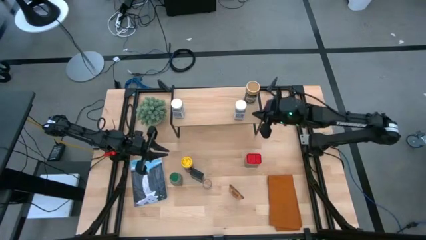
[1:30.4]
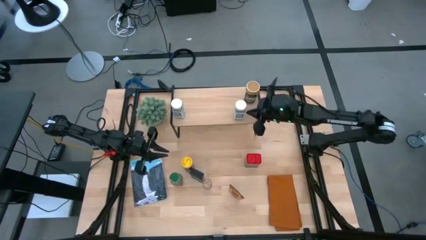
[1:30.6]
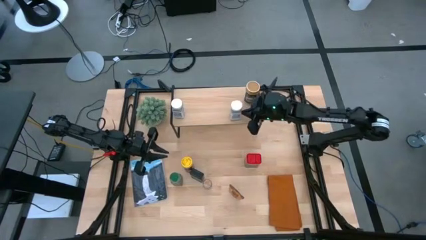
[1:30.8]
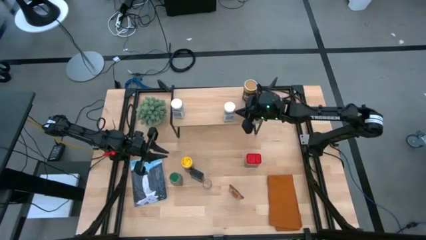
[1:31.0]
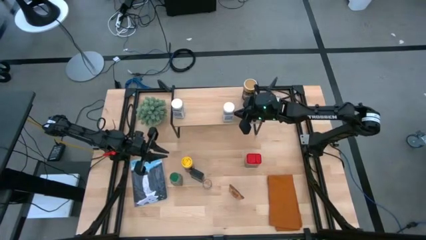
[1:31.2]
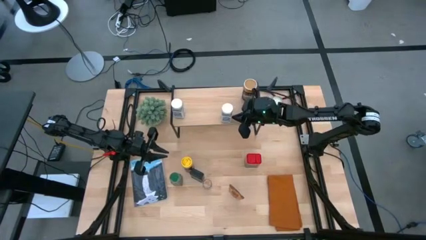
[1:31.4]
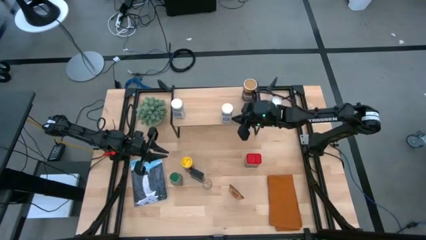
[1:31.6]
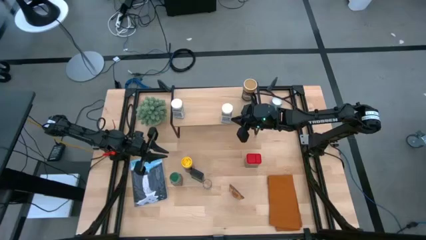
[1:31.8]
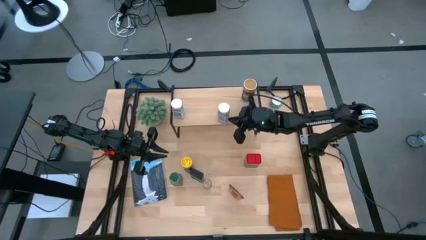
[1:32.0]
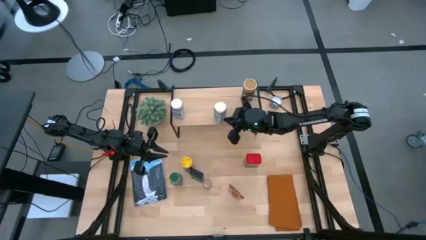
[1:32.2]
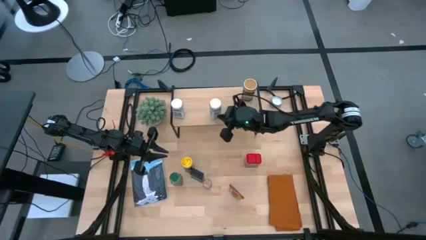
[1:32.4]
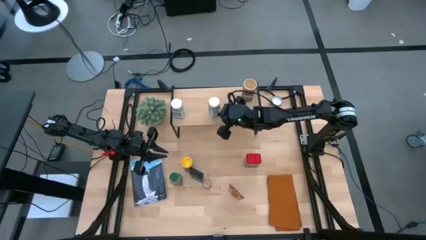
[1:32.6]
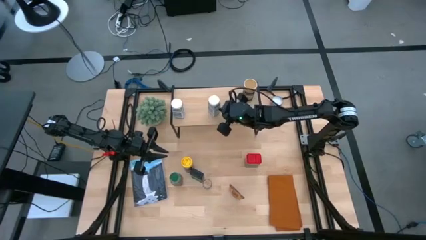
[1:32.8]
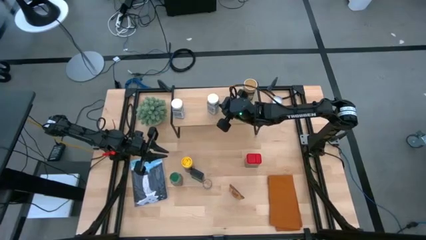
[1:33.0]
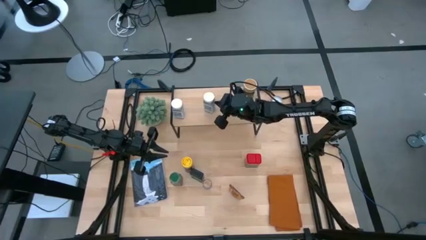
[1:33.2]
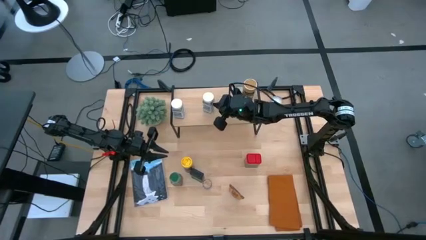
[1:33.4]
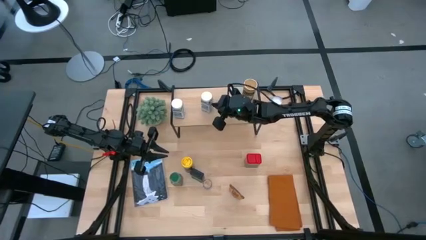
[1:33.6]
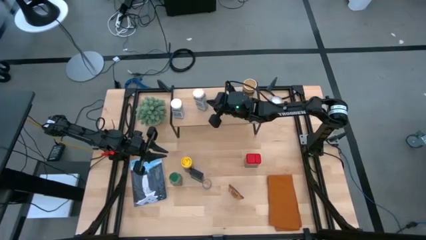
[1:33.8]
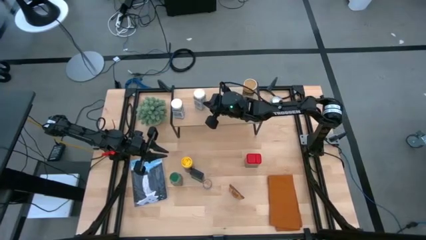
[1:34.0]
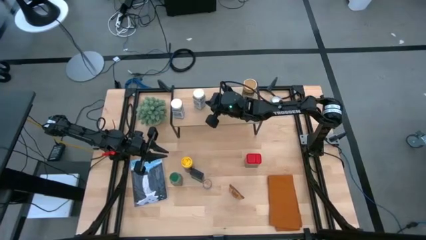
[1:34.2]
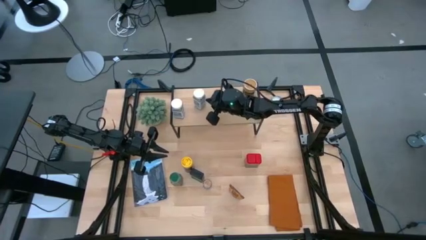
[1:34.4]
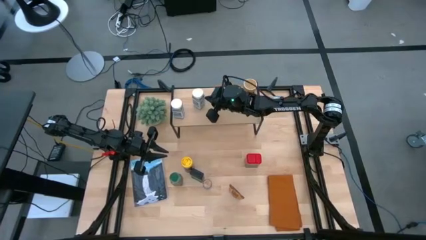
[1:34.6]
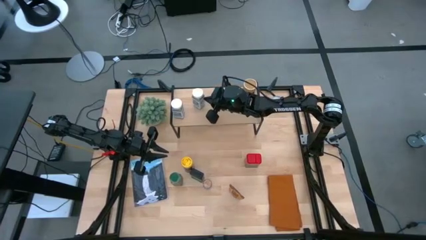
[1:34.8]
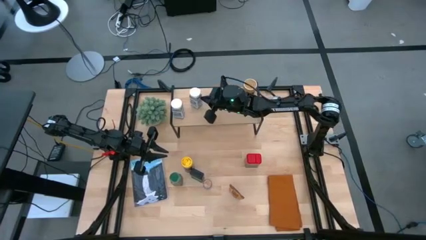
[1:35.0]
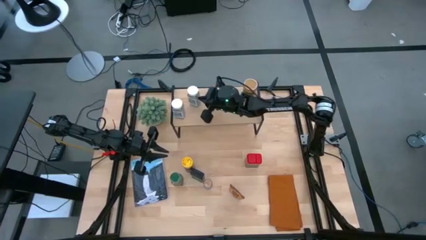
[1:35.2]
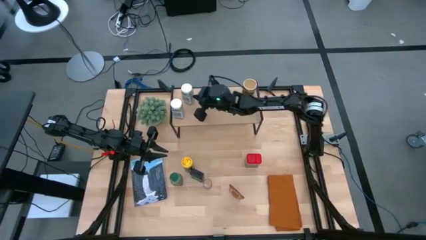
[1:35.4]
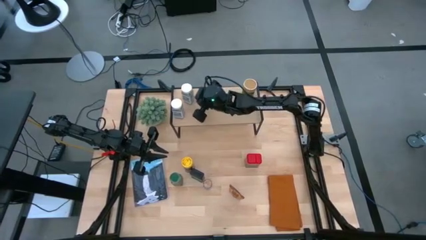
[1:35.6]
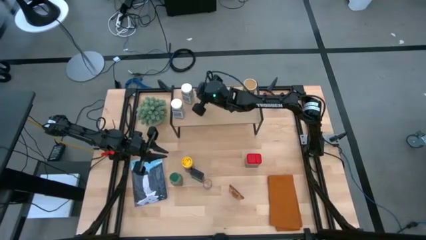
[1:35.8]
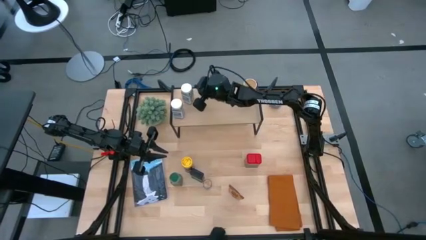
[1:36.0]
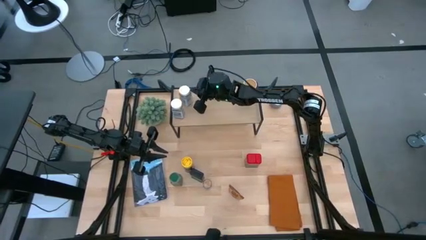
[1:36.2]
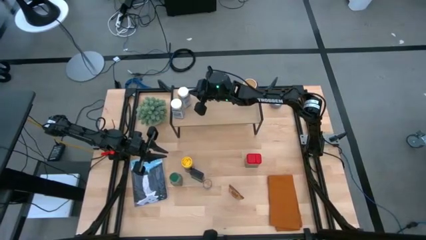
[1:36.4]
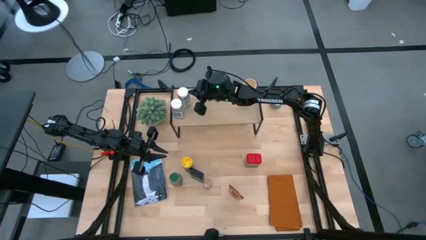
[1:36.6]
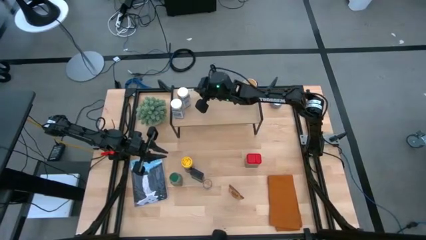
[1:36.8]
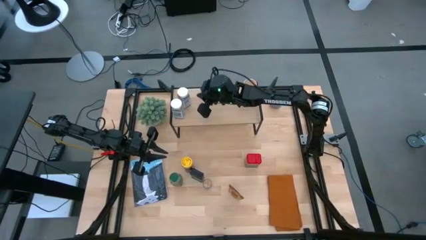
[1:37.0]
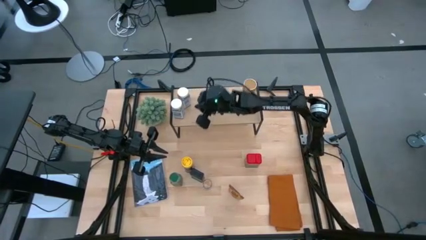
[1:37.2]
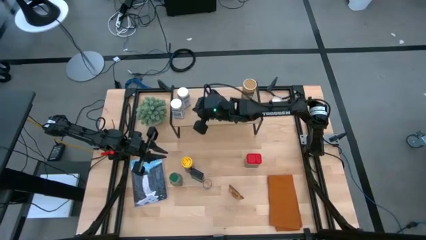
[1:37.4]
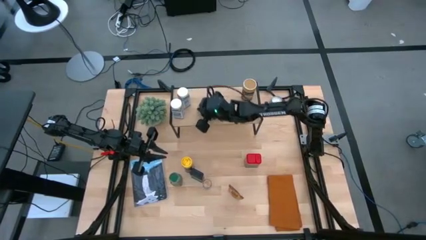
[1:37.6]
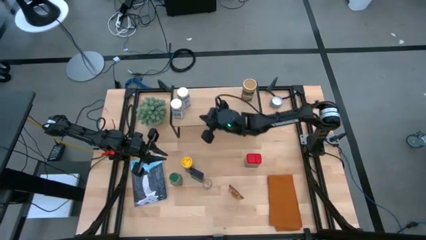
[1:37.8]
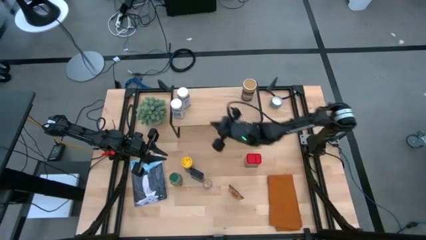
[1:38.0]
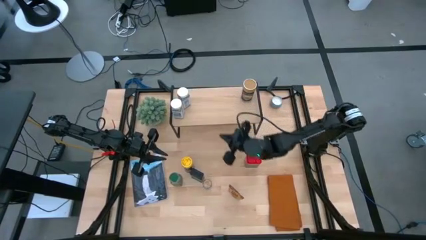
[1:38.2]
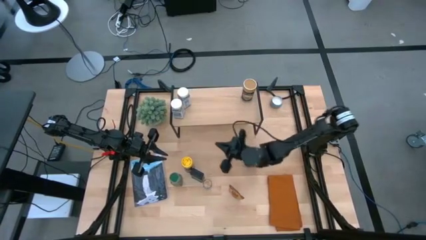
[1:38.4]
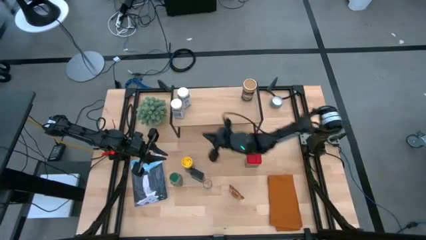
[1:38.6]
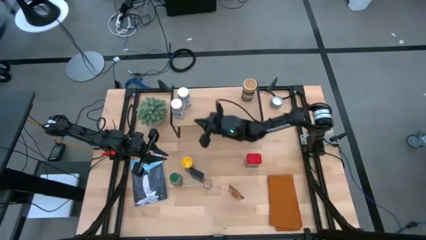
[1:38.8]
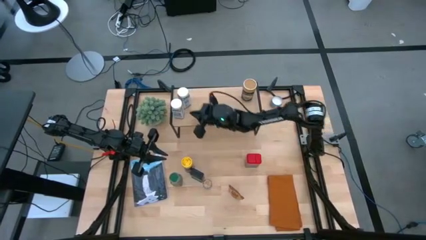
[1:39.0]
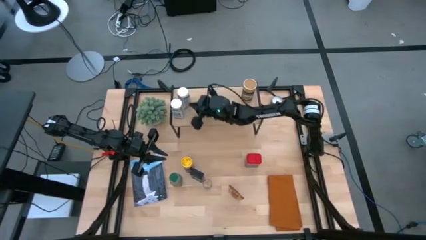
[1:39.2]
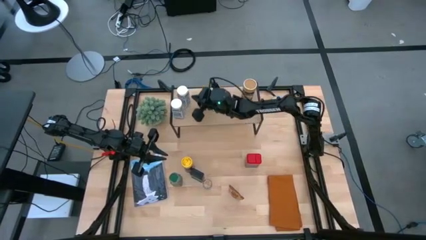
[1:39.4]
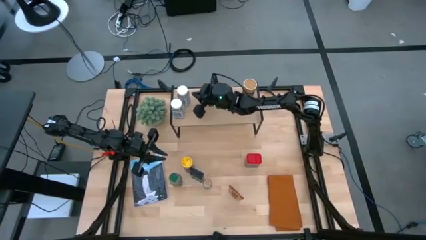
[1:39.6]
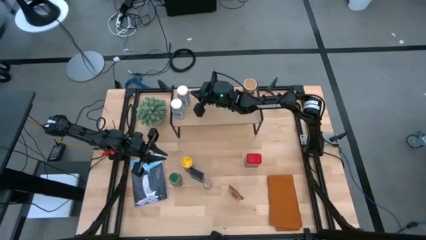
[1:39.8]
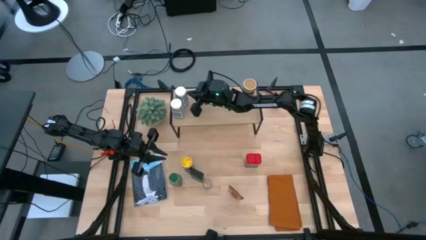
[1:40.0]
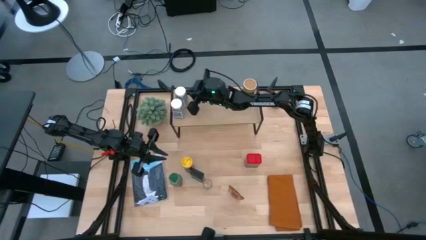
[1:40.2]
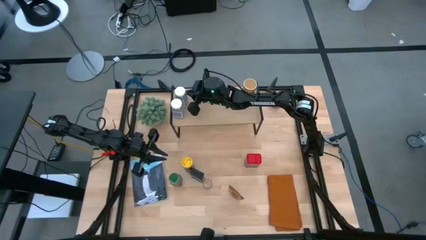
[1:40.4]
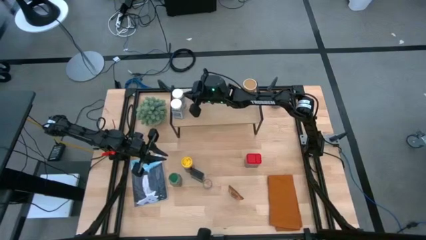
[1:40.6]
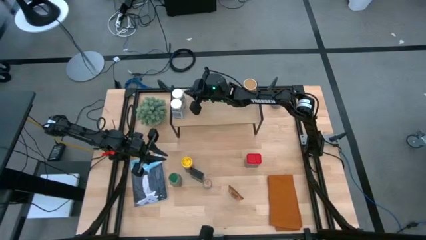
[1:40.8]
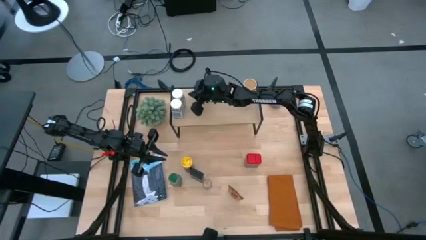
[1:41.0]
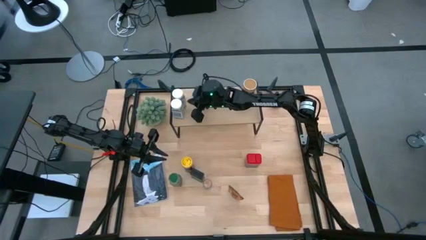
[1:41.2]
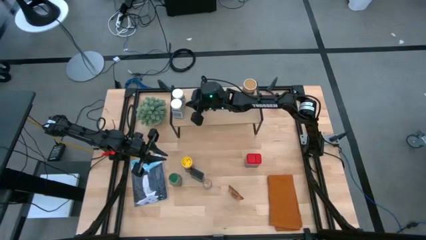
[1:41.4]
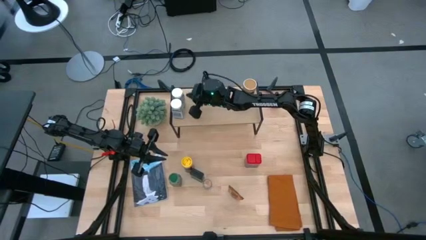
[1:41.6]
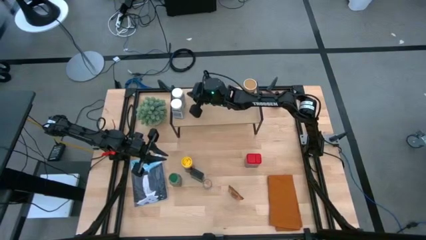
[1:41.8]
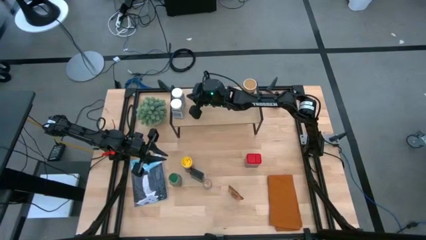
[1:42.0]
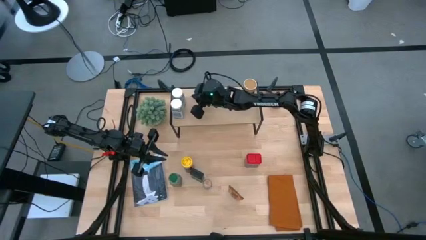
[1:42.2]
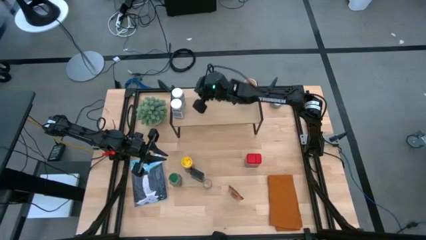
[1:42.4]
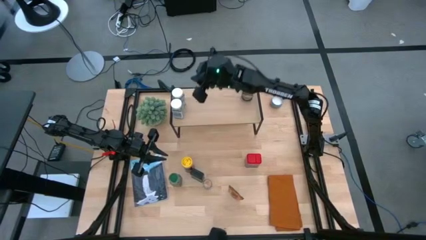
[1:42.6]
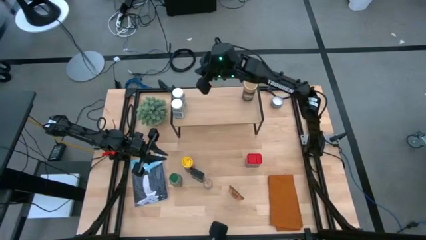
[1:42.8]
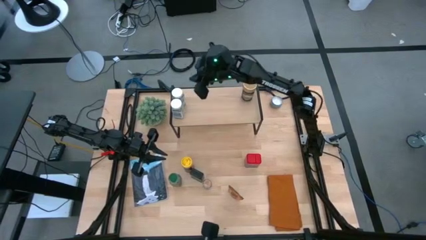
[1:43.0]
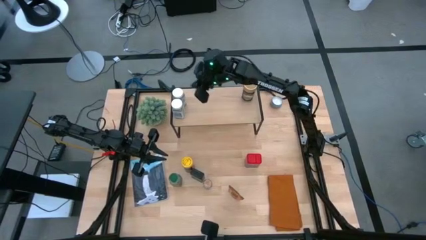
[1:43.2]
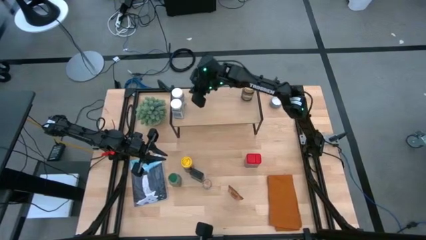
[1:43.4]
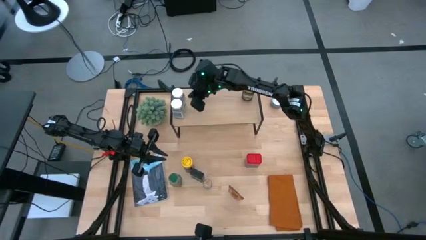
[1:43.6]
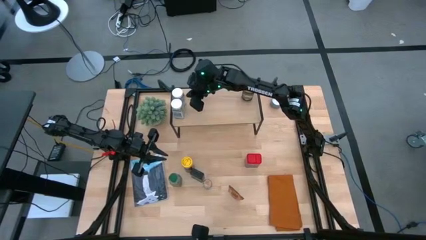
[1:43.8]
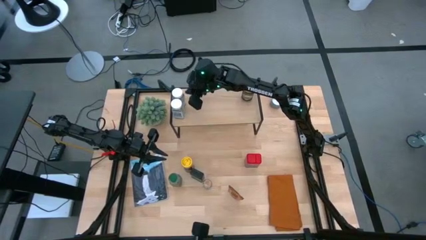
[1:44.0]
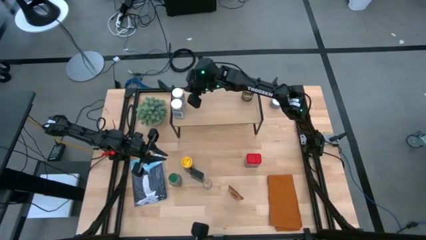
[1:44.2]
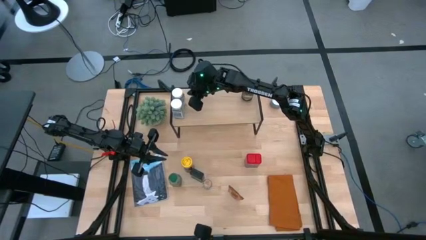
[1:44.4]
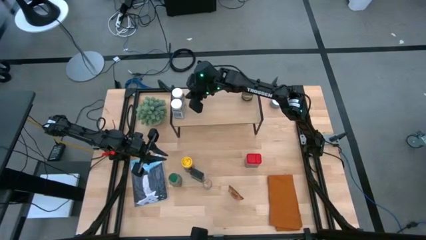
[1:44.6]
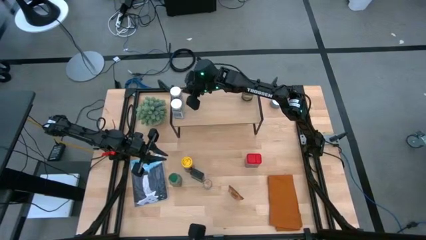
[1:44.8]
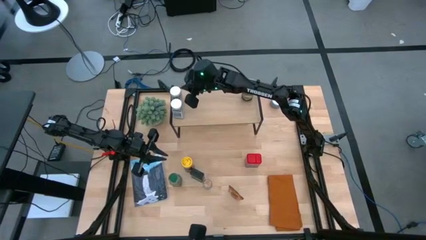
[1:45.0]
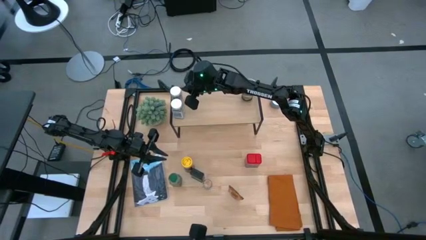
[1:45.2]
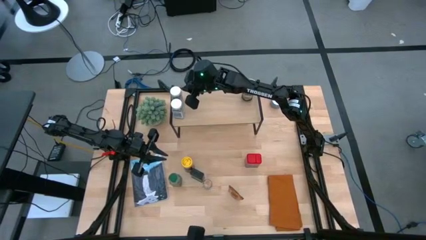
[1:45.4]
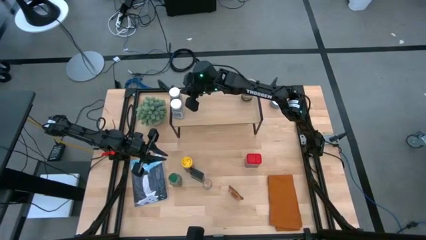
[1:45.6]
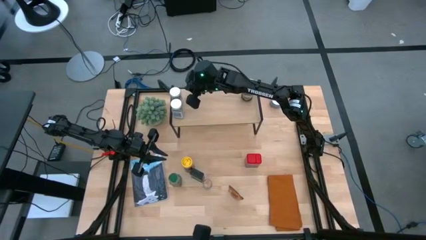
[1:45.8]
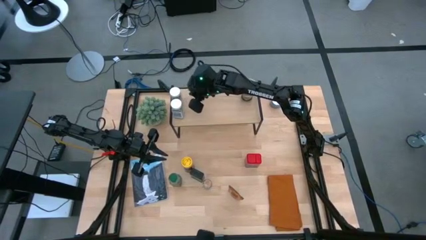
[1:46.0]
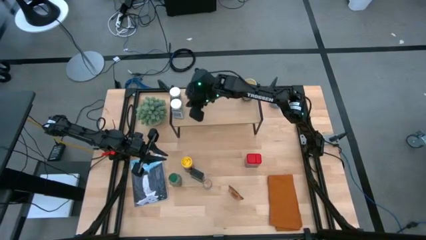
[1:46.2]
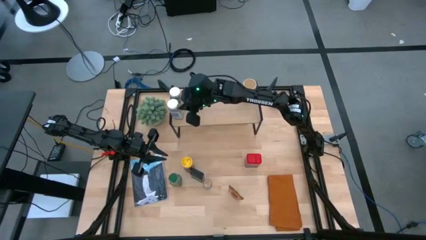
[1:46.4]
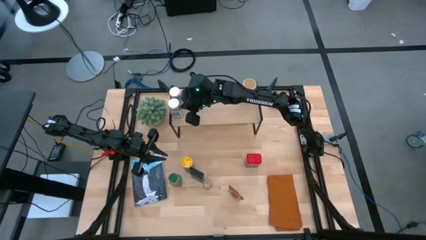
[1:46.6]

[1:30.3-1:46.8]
Task: Shelf spices
Put the white seasoning bottle on the shelf aligned with the other white seasoning bottle
